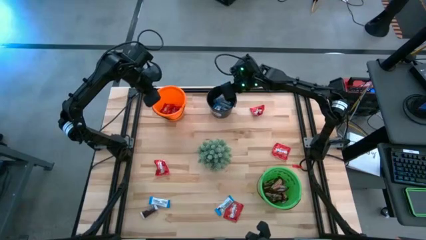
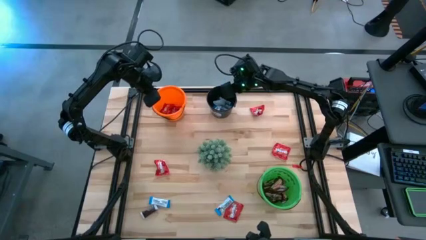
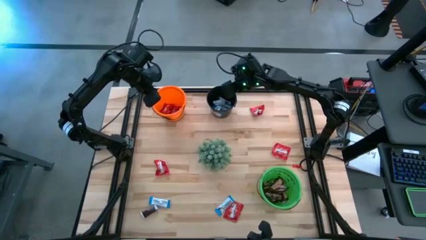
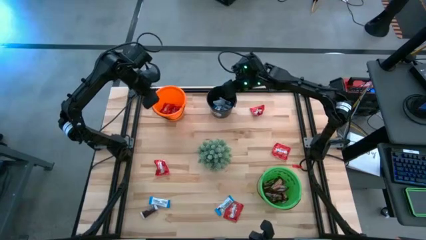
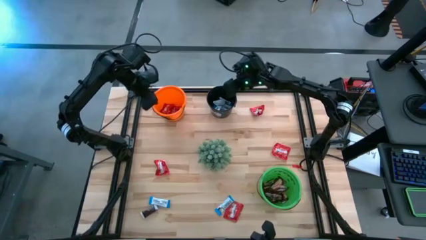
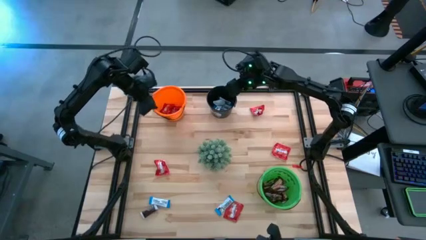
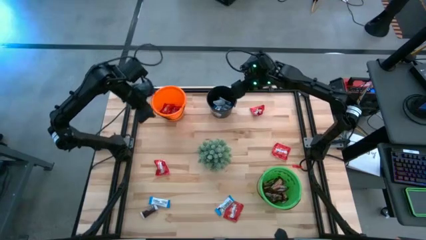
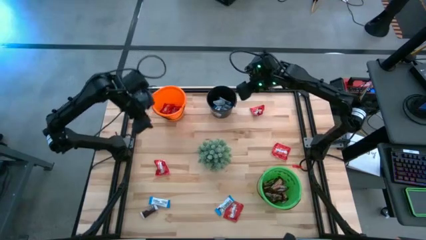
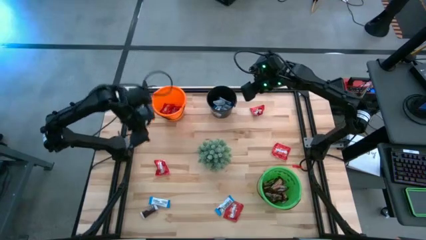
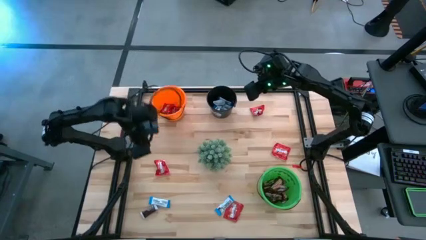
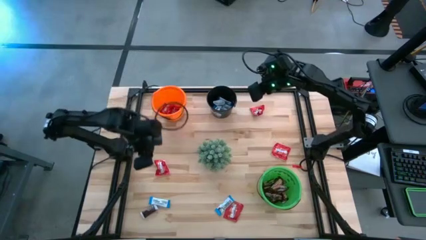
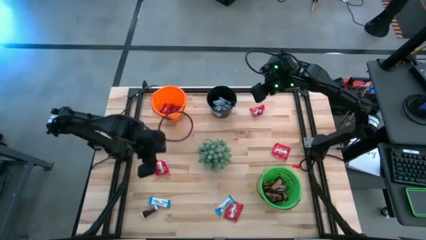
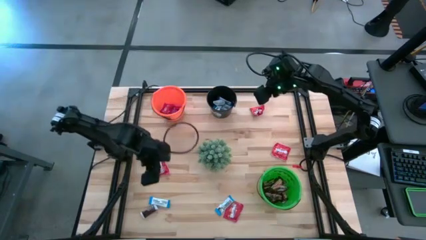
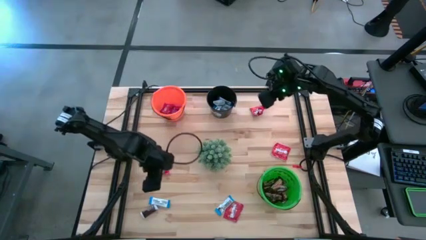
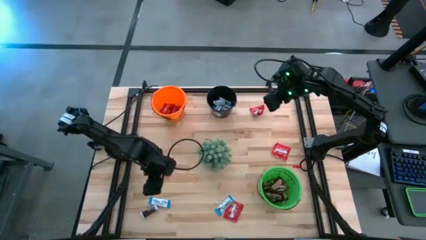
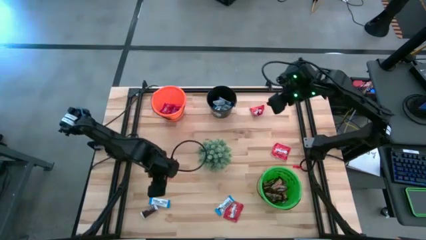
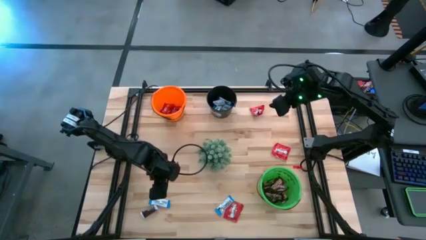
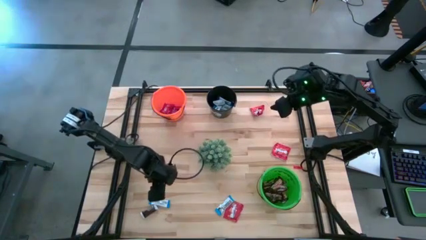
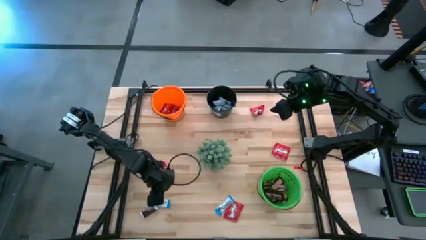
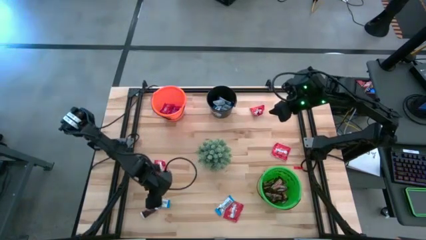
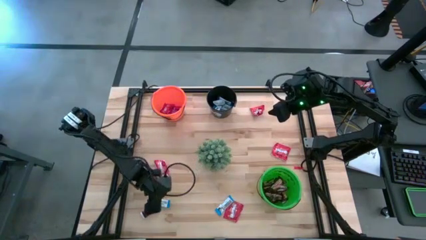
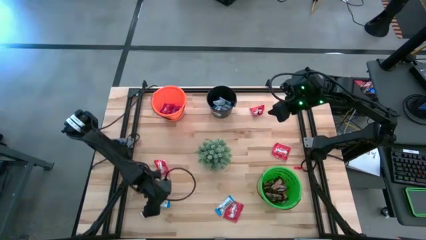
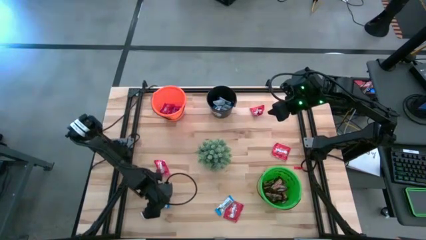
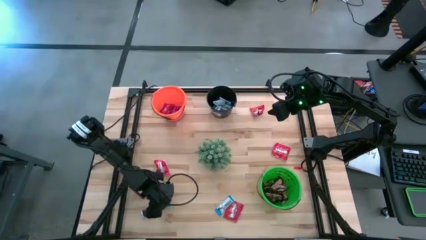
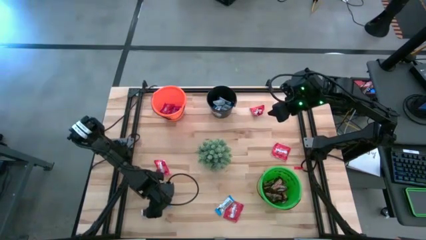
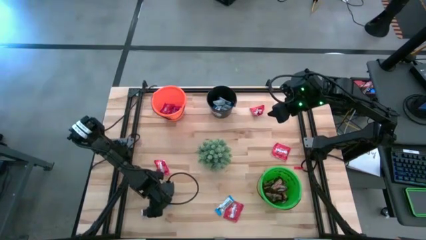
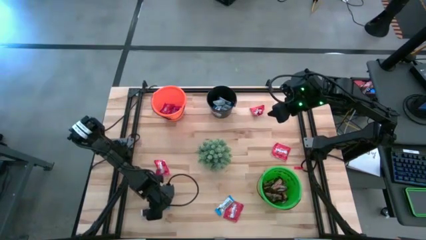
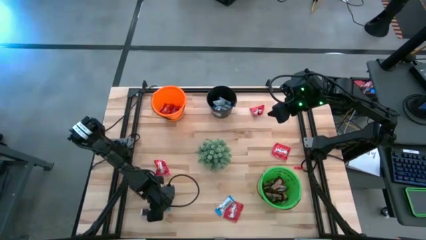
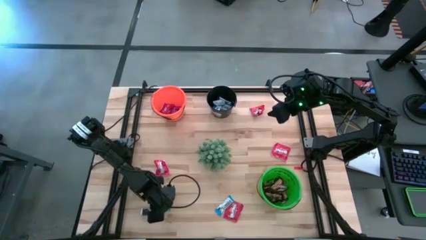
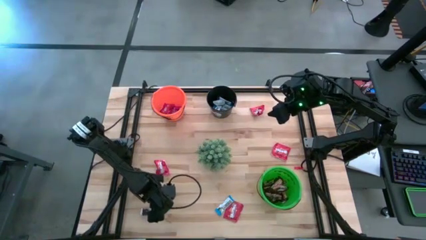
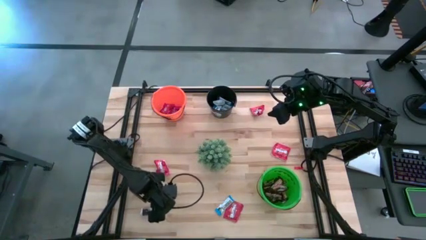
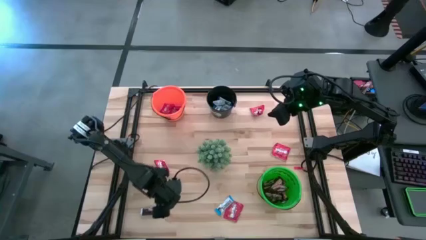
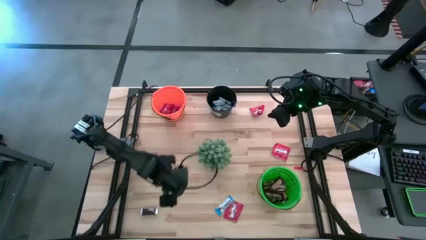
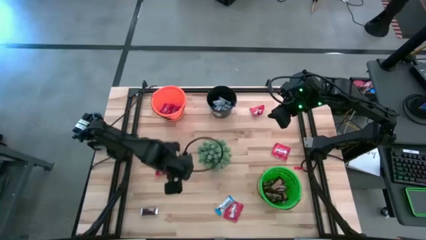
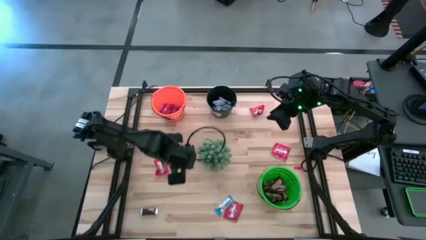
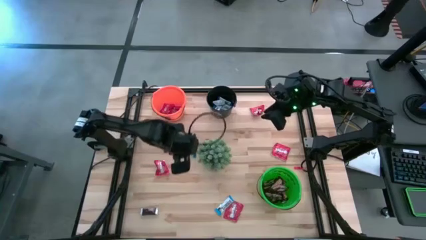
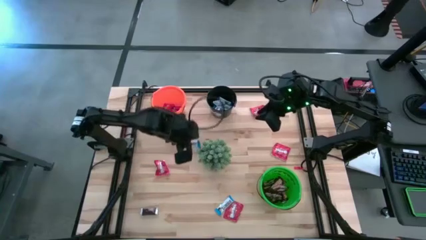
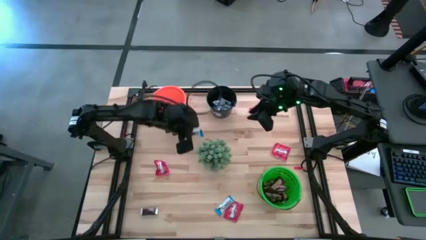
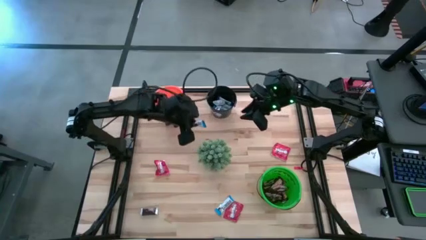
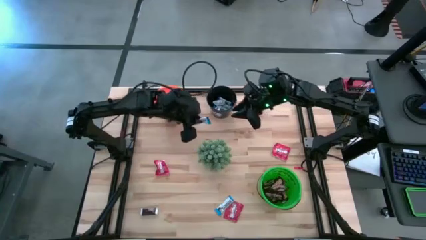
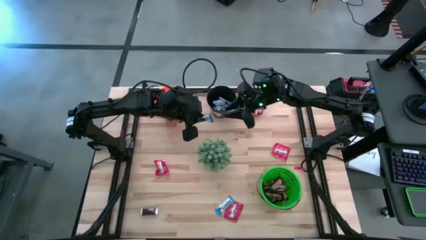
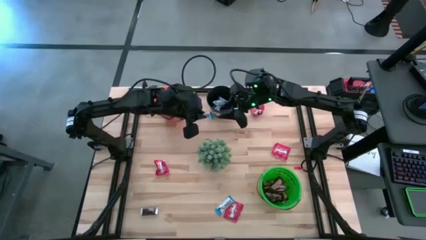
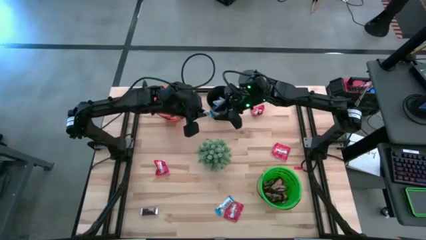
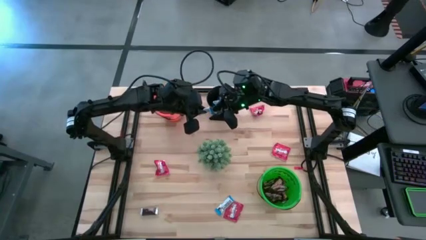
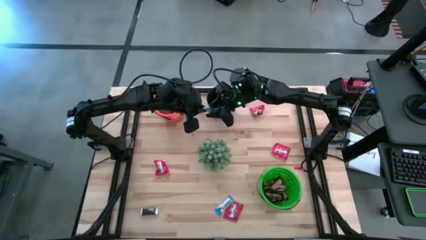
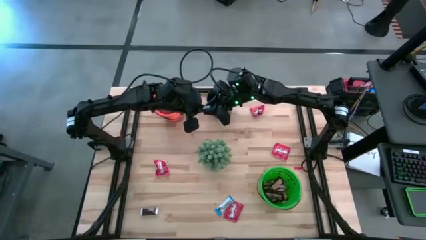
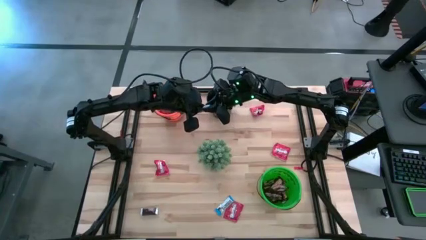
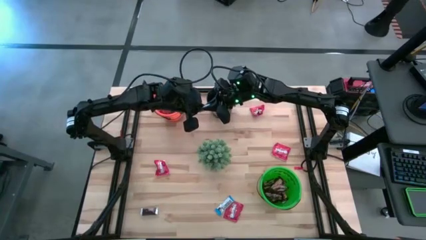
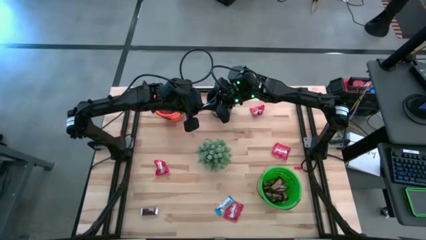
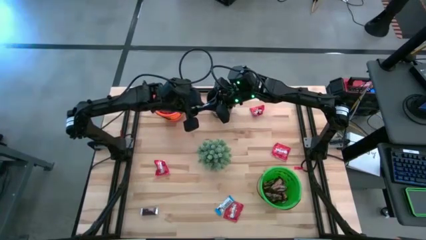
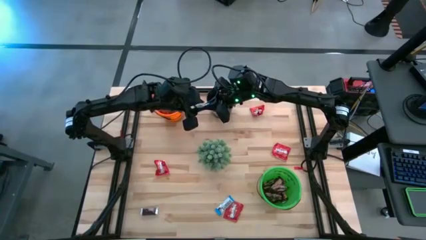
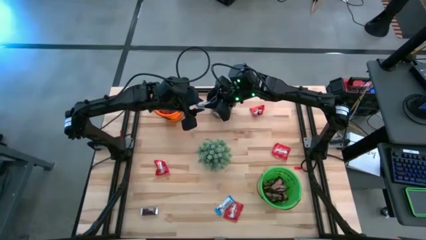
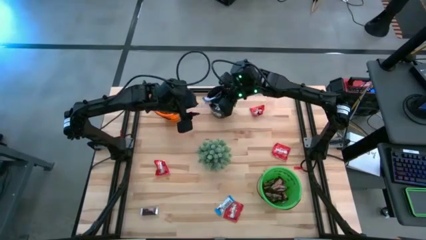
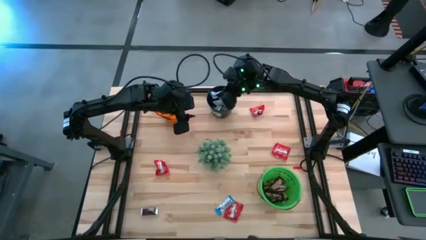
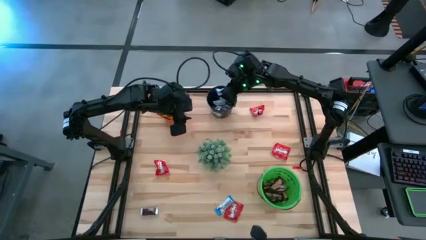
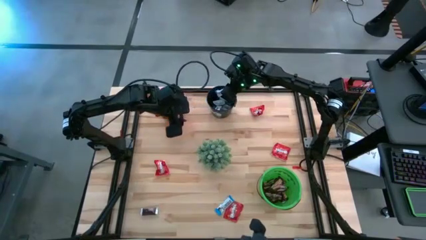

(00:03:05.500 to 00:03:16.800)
Task: Organize candy in baskets
Put the white chocolate bar into the black bucket

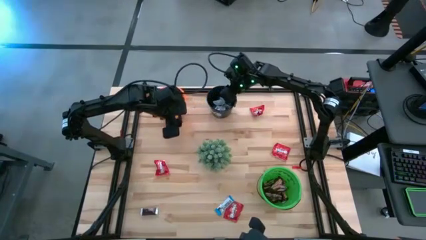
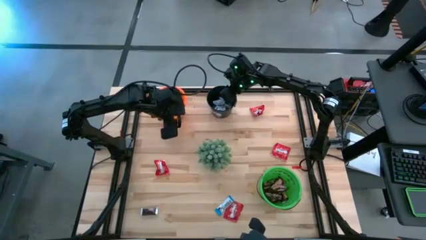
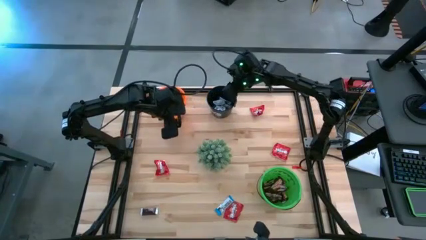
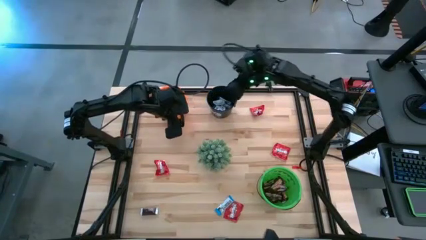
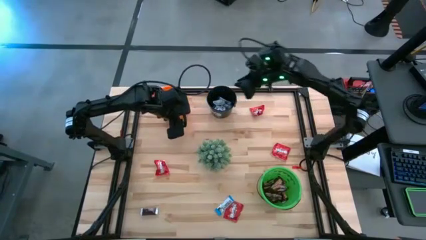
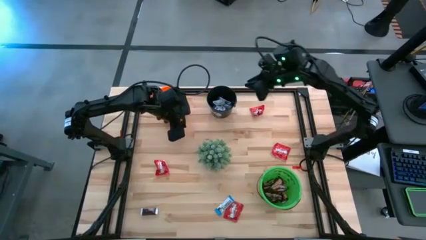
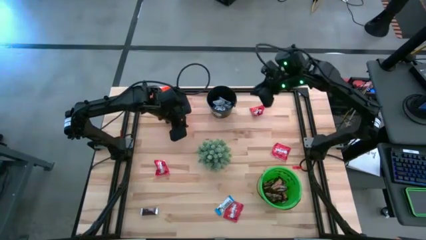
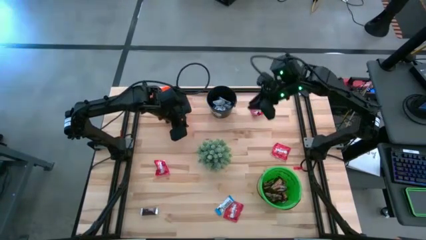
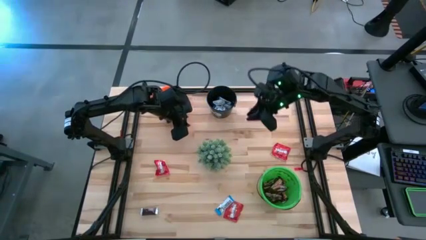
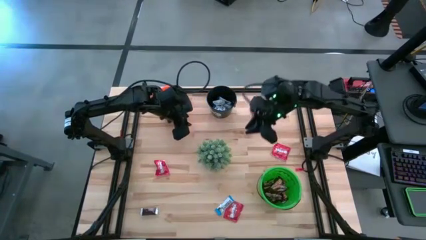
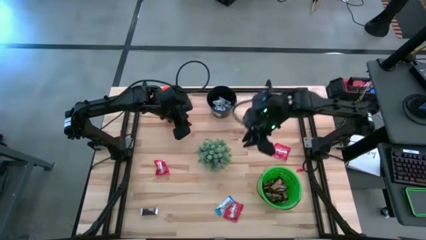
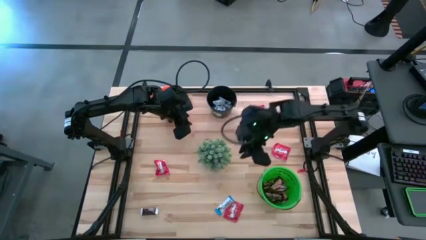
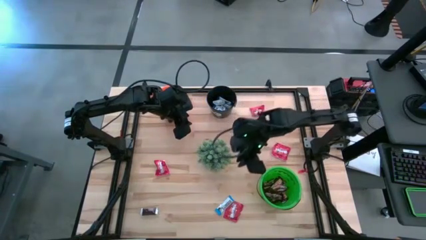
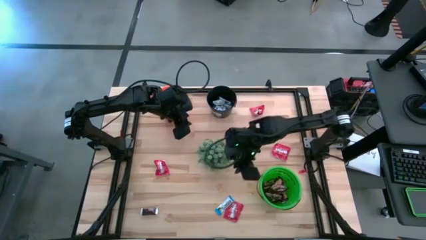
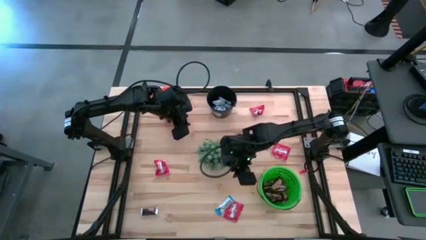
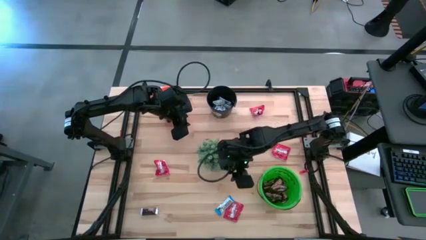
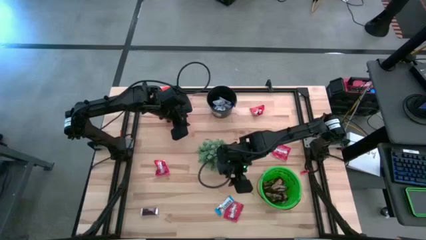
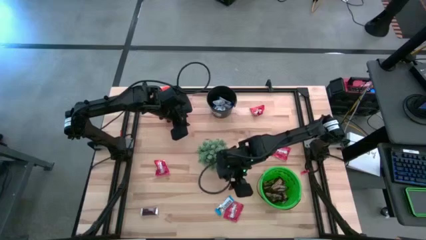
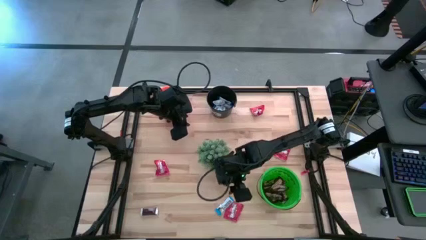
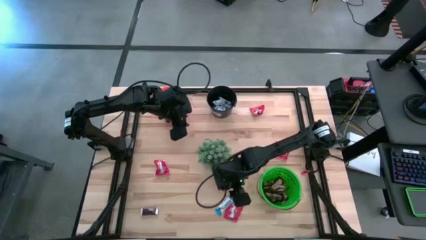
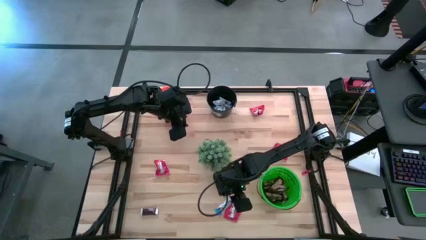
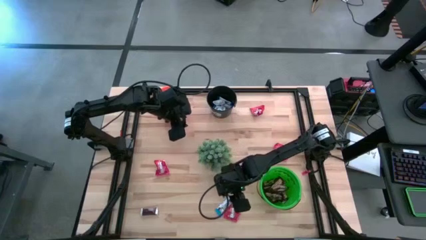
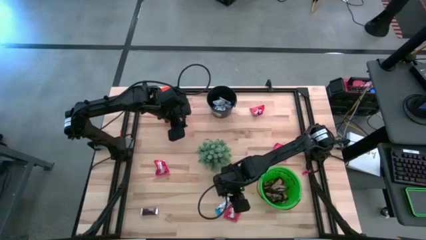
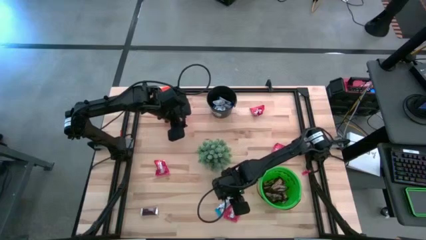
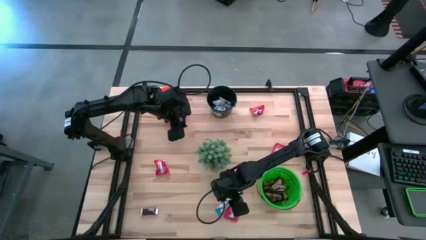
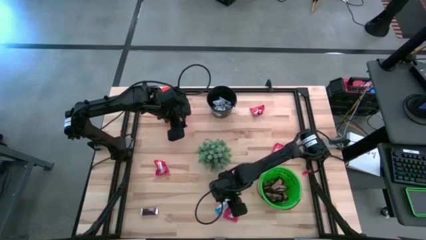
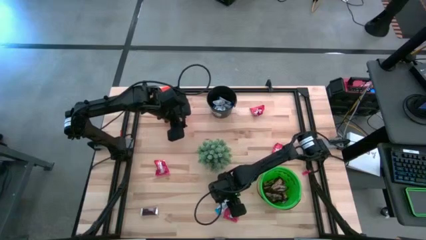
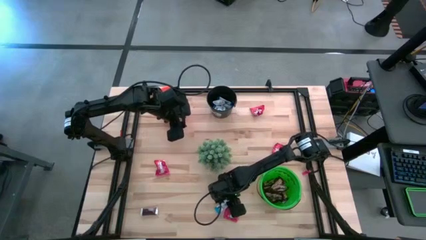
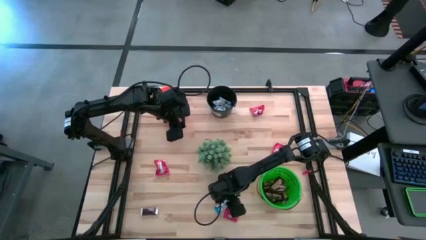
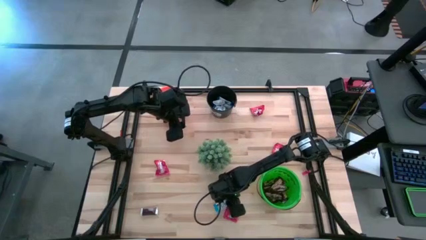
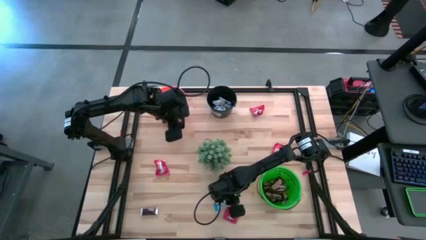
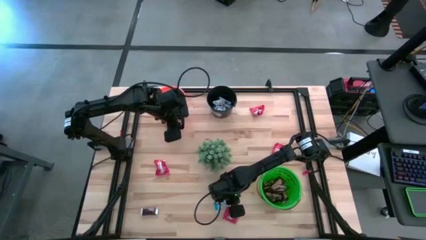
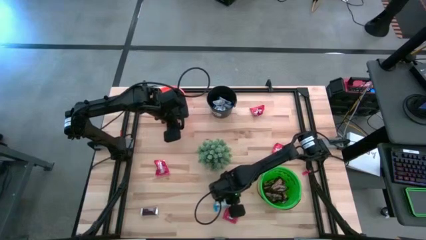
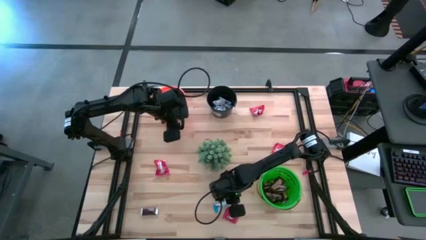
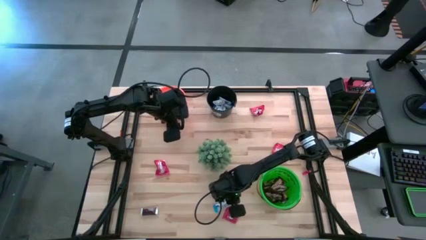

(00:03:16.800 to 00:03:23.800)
Put the white chocolate bar into the black bucket
